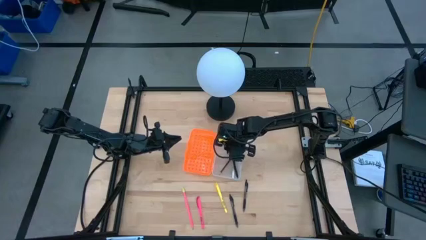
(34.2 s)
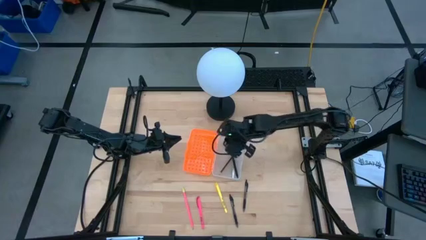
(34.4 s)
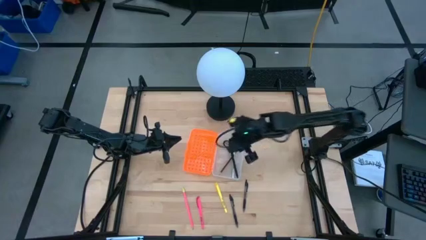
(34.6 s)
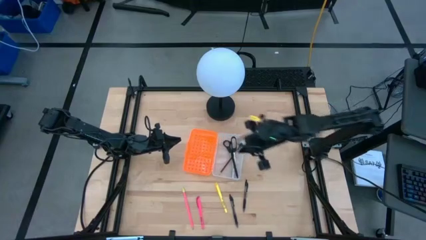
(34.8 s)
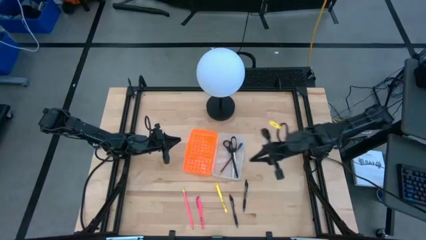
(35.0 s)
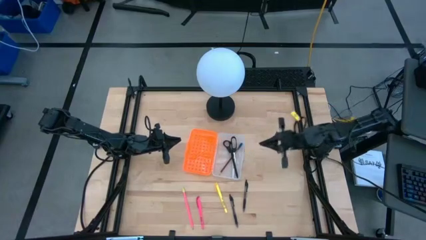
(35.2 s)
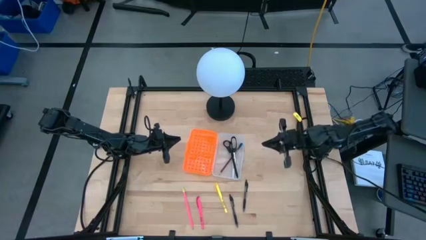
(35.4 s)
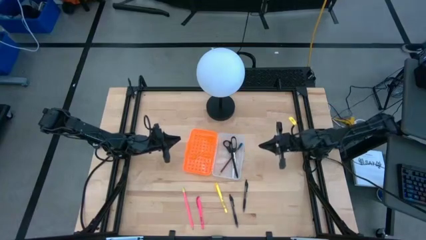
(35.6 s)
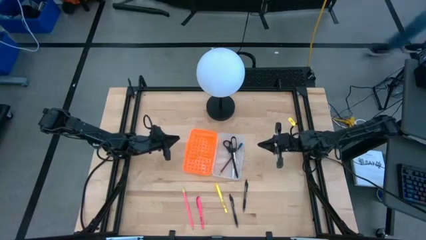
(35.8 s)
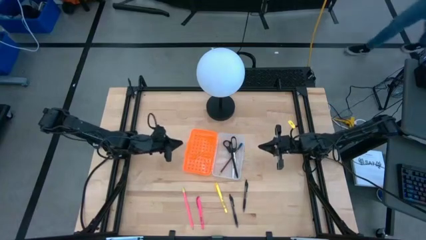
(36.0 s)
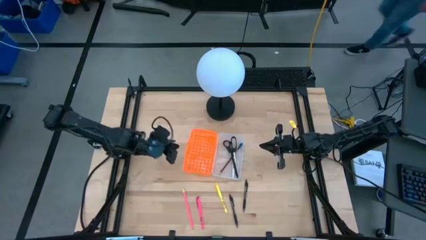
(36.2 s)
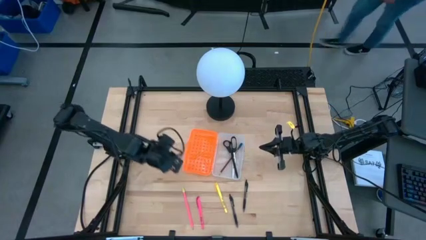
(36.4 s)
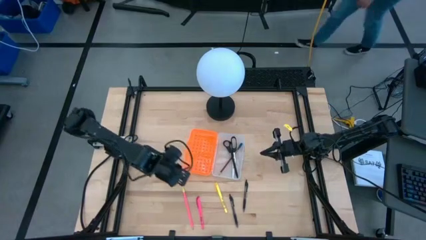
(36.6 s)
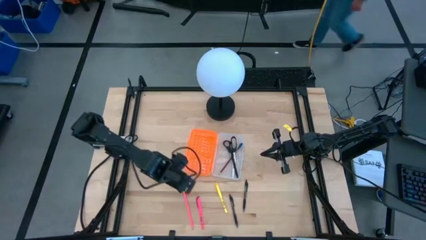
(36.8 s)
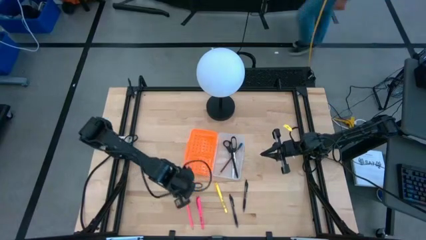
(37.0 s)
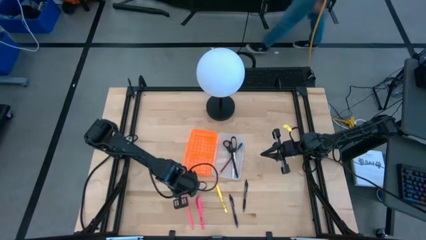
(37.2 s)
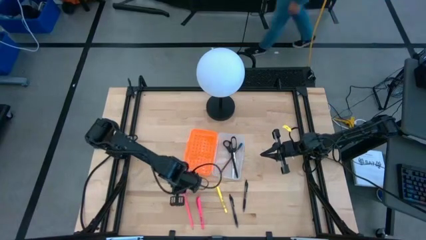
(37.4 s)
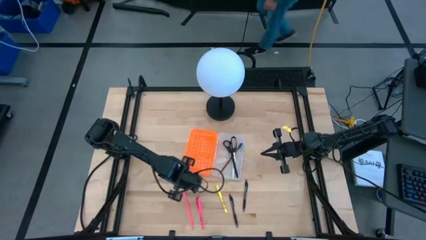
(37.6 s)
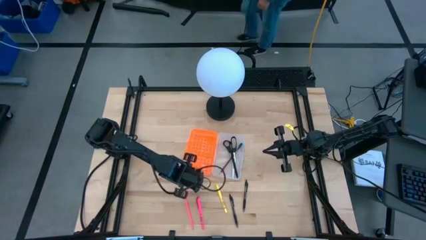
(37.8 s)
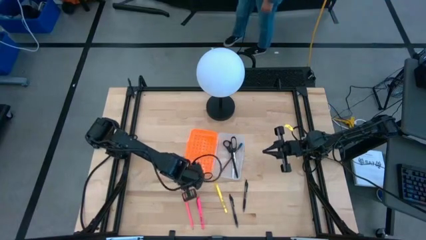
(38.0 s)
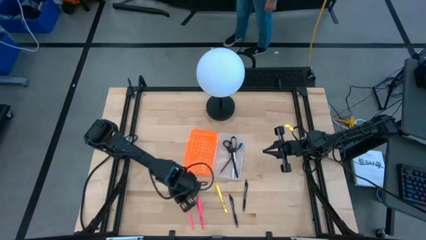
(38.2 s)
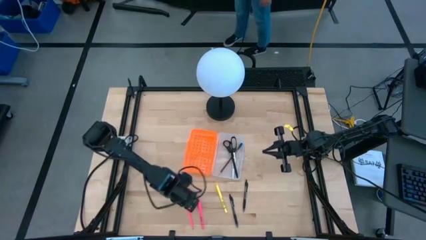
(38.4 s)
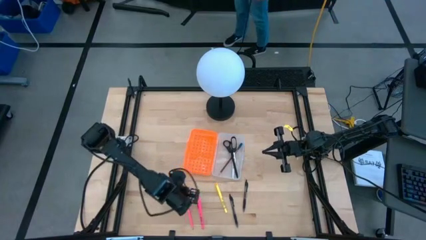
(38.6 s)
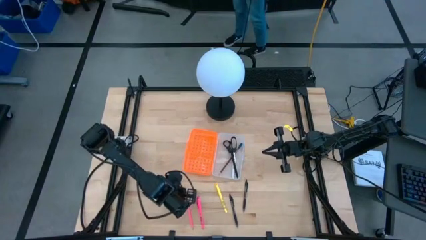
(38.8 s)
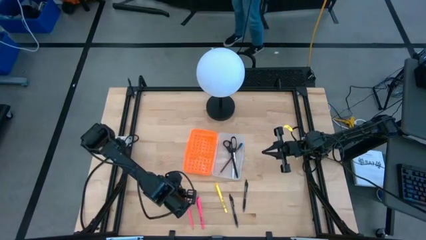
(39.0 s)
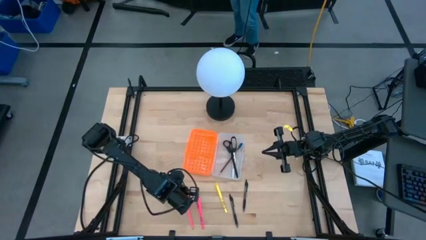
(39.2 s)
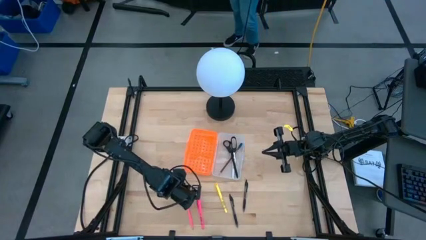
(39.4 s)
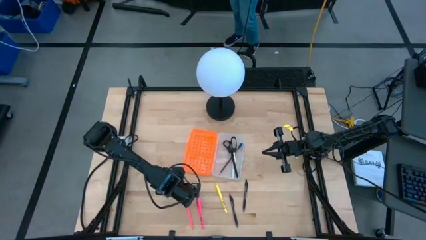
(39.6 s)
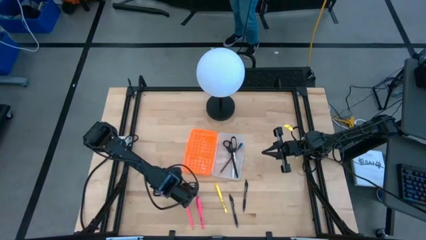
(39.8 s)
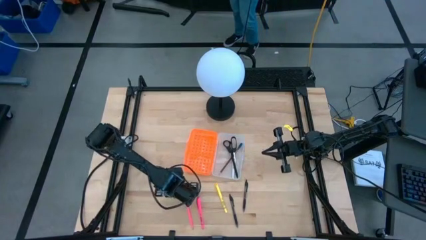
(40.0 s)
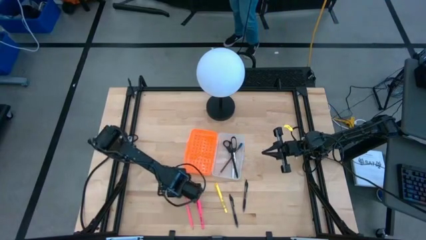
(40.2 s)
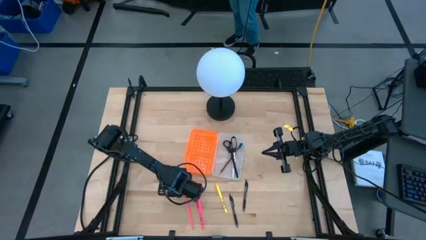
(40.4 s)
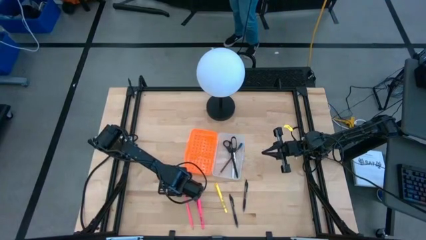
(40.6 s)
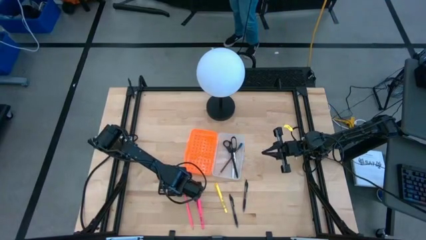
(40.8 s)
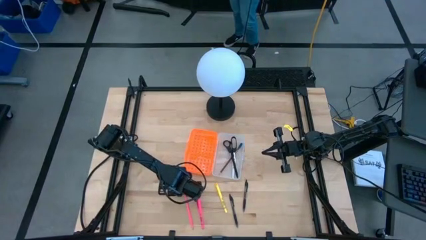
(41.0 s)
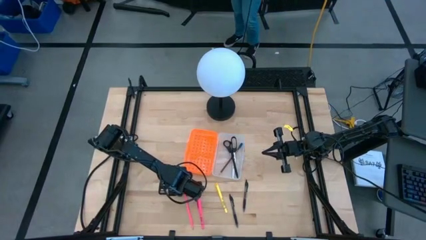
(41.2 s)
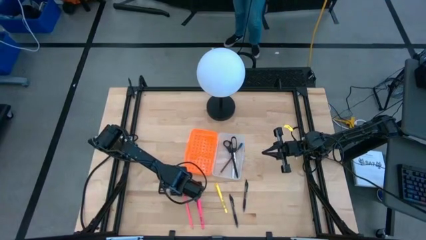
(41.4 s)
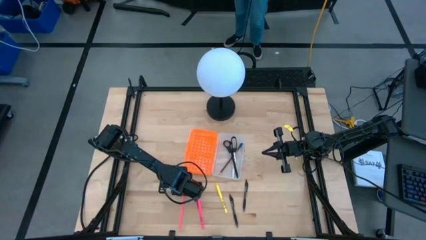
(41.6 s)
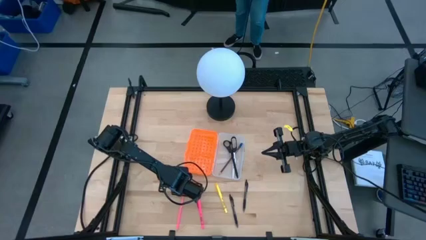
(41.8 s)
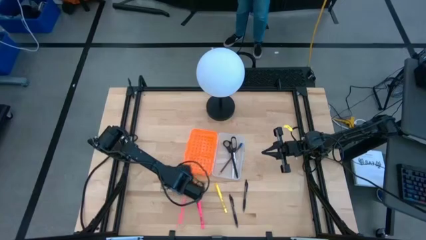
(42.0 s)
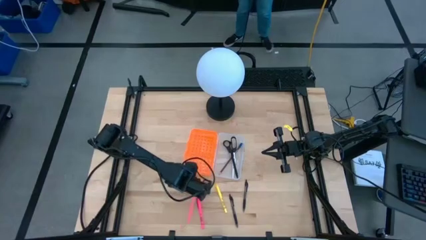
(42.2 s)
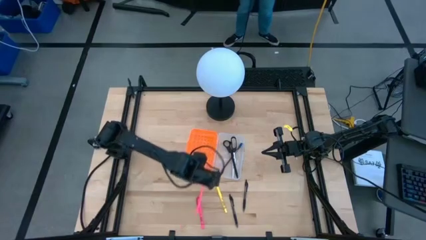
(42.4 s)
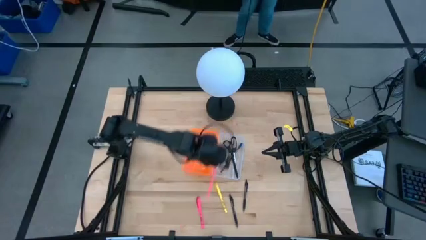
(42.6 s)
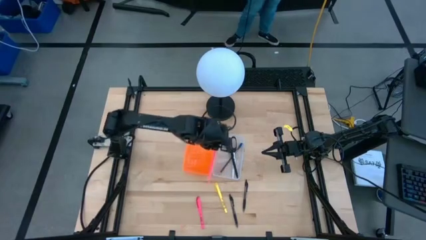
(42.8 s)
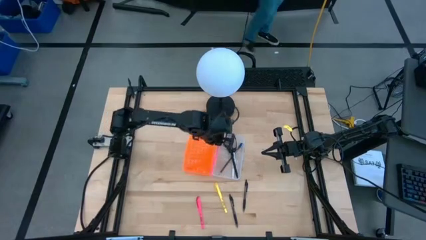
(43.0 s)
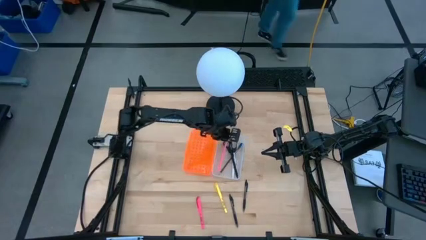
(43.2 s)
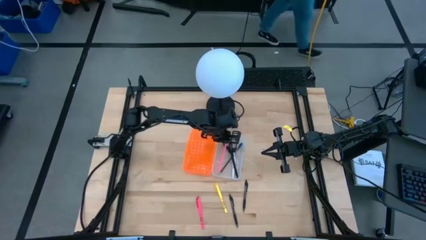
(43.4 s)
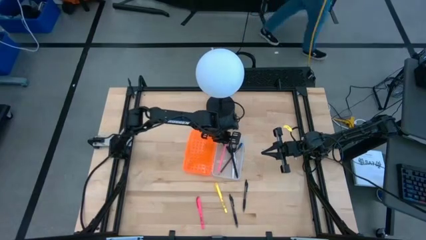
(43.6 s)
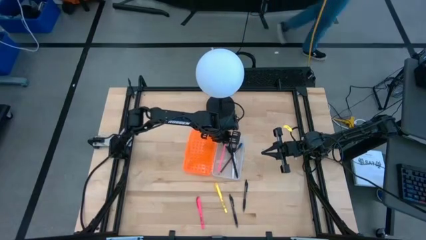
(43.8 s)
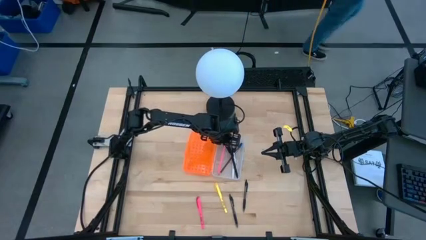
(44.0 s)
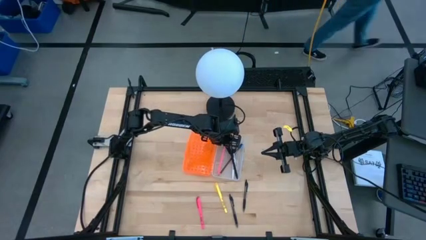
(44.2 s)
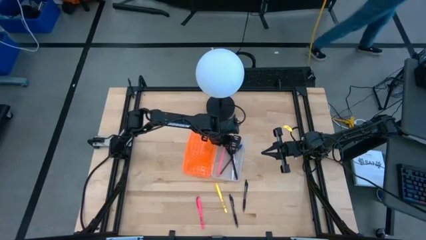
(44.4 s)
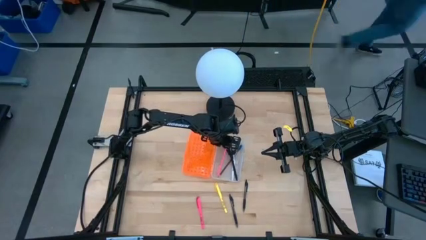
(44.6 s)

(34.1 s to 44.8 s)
Task: Pick & place school supplies into a supply box
Put the pink pencil into the pencil box

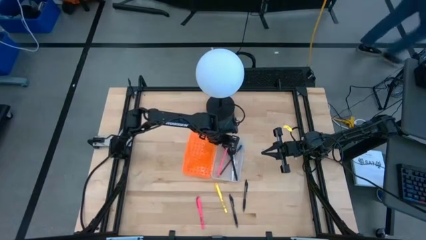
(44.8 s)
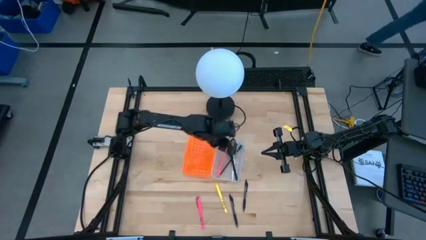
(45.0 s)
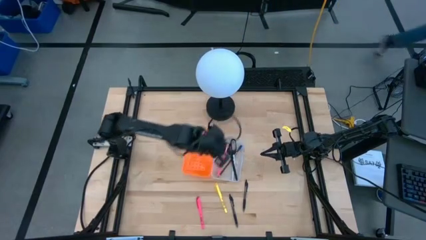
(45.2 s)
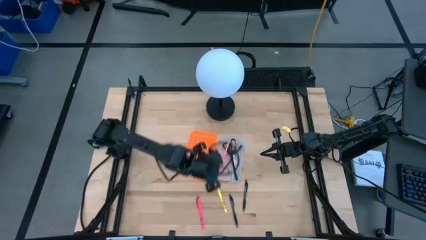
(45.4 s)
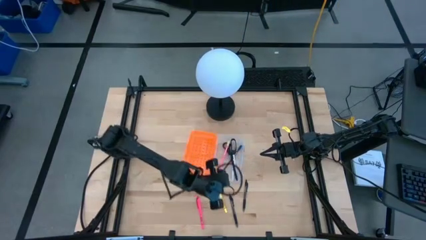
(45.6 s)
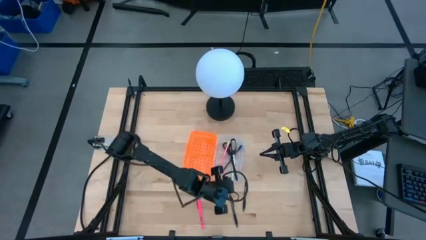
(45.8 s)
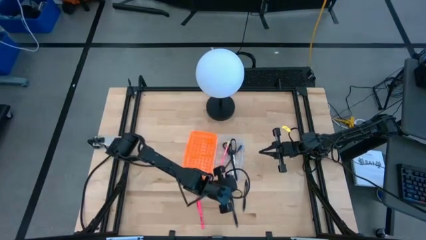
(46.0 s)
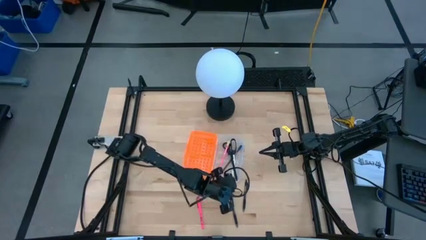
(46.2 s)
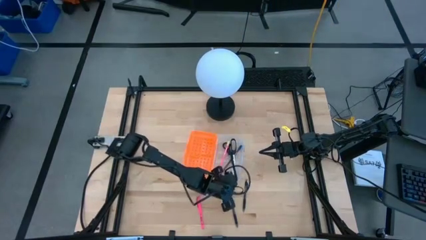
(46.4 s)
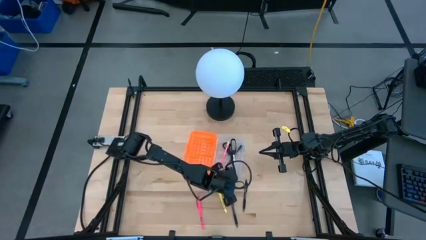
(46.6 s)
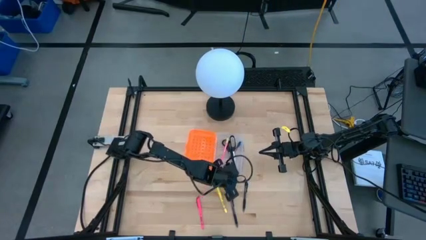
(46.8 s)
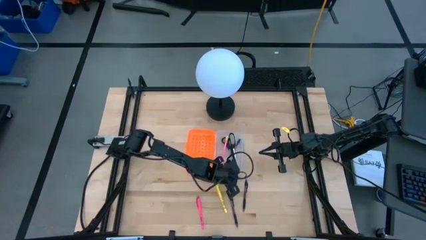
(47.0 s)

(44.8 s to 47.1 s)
Adjust the pencil box

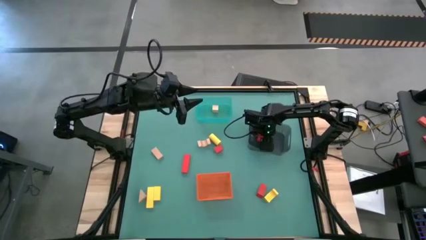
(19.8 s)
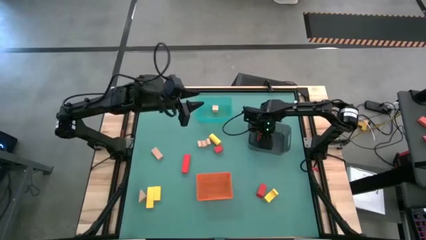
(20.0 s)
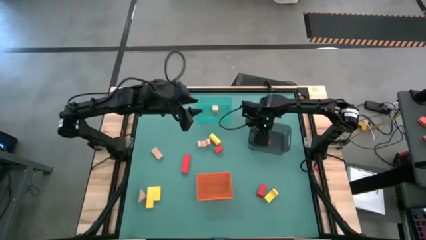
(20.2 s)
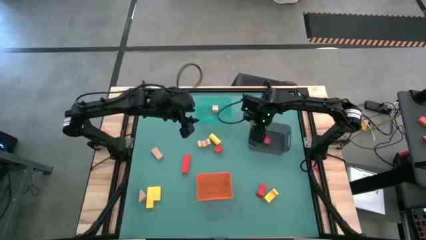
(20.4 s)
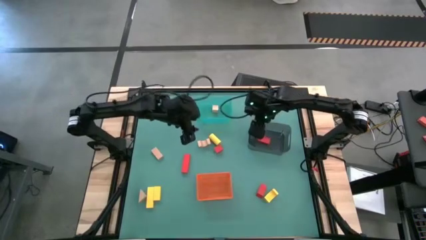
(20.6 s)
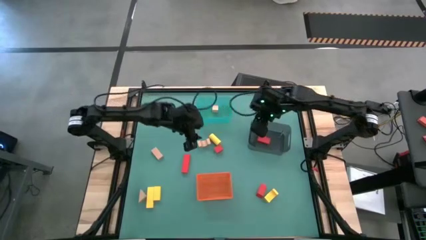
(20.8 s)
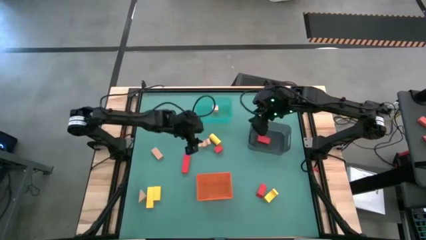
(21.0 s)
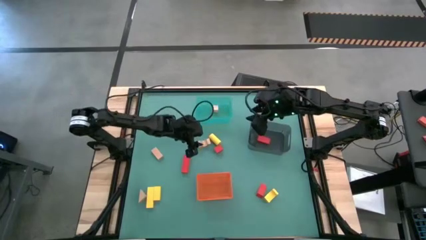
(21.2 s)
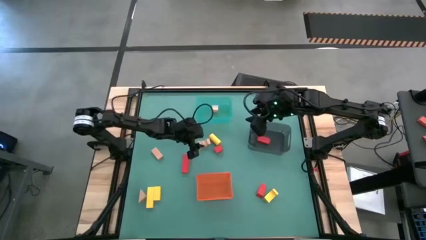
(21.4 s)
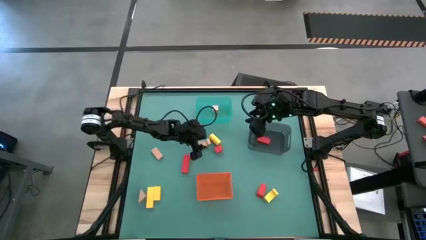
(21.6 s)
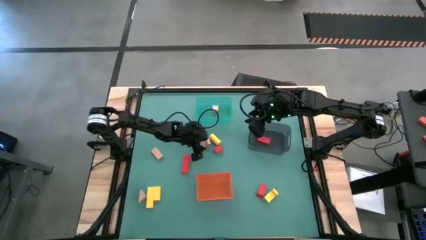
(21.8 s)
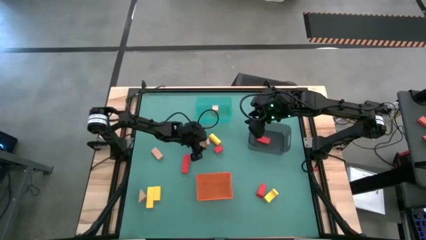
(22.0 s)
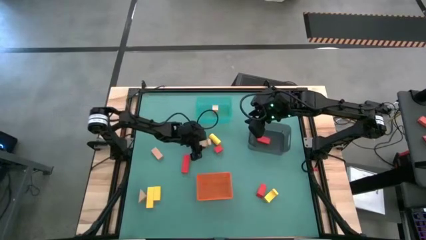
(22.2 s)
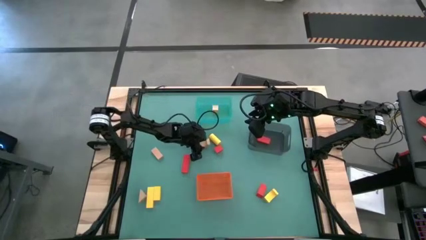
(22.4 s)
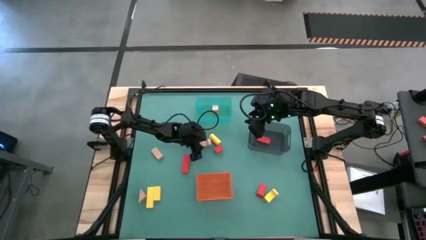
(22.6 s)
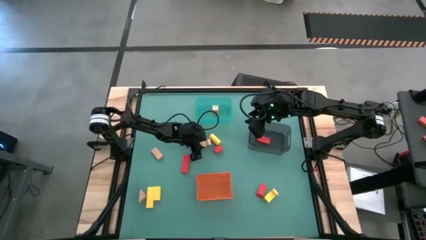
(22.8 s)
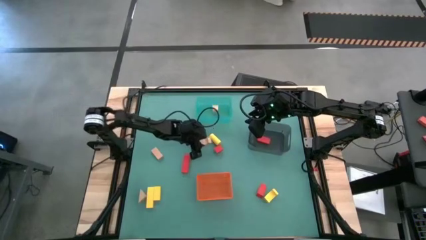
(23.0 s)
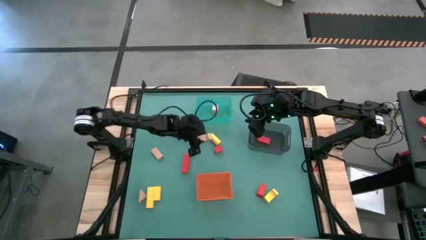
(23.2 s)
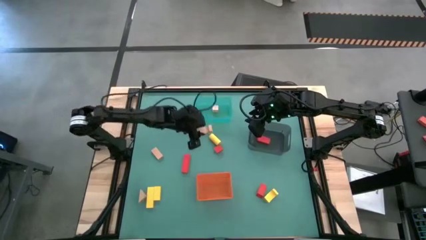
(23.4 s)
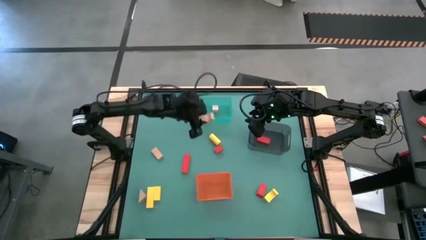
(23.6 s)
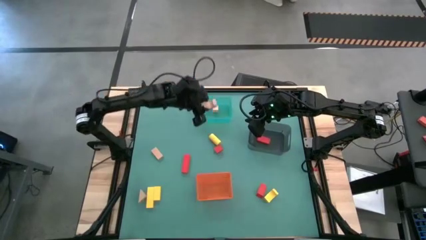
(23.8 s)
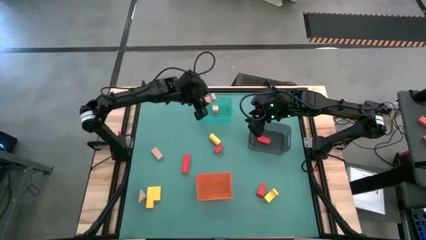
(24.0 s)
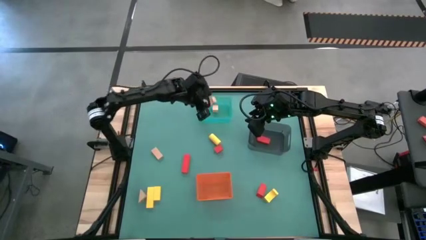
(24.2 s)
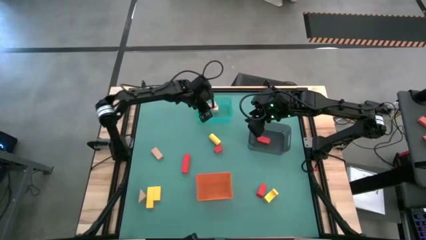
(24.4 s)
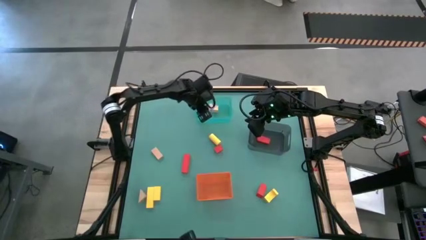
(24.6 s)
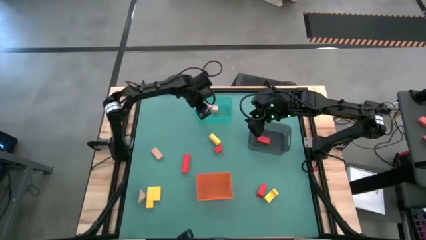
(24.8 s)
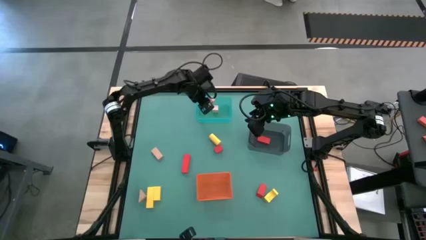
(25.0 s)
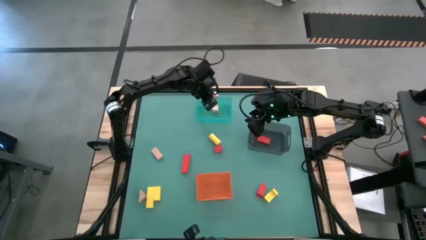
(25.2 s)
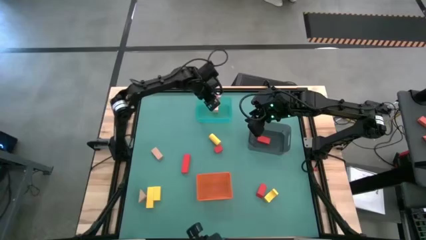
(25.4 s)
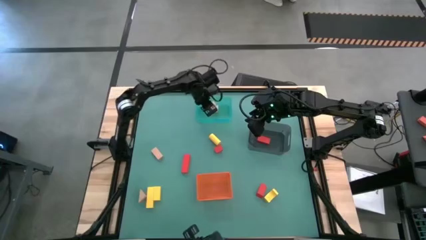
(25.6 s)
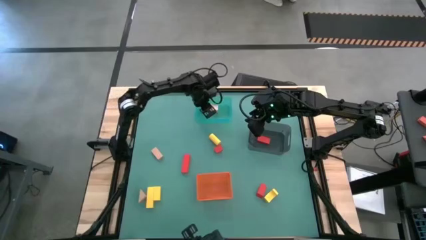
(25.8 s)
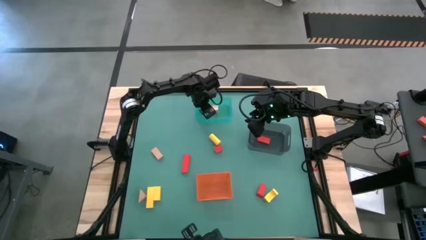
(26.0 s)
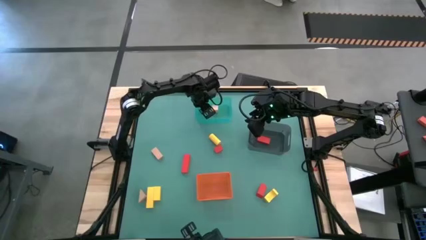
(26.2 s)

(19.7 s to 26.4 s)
Task: Sort & place blocks by color
Put the brown block into the green bin
